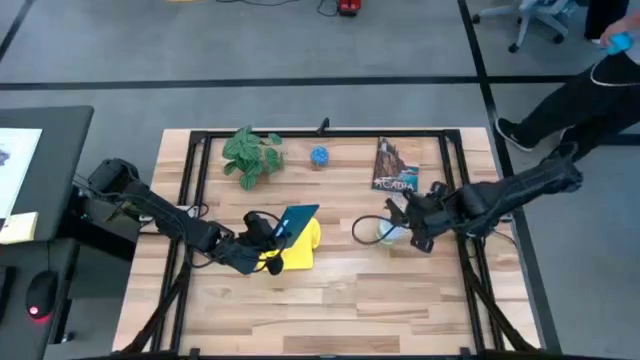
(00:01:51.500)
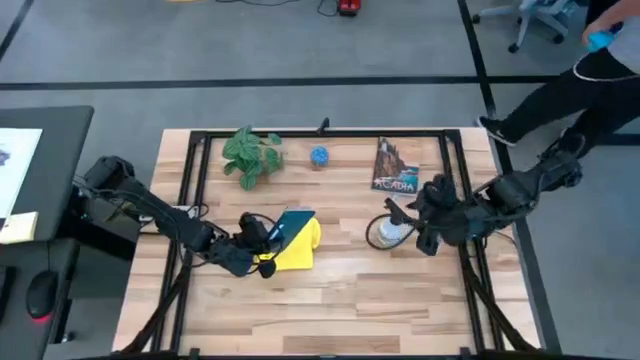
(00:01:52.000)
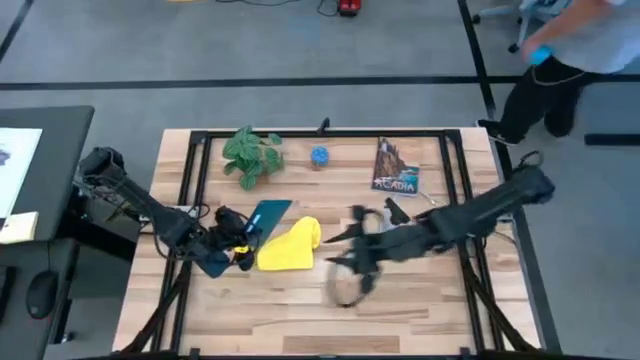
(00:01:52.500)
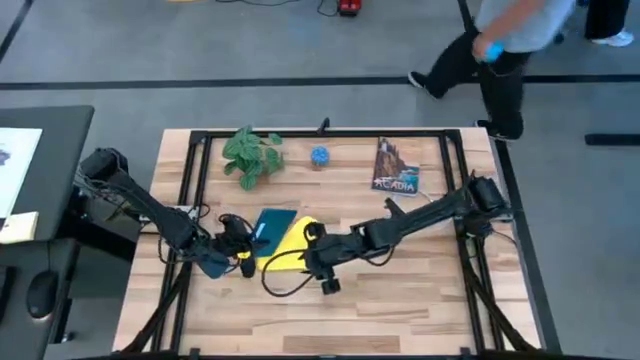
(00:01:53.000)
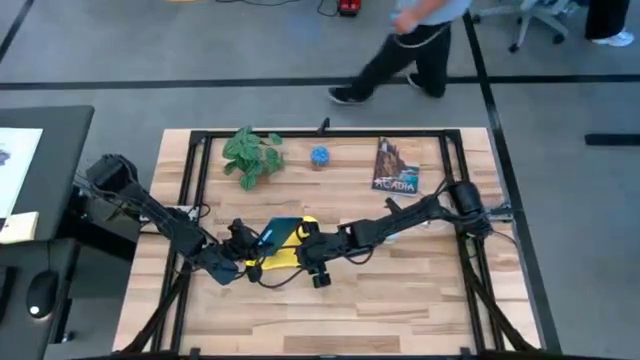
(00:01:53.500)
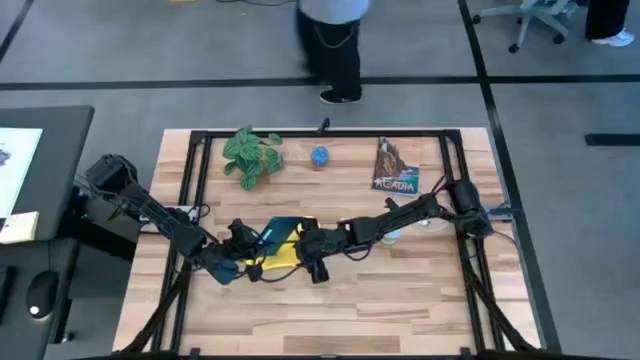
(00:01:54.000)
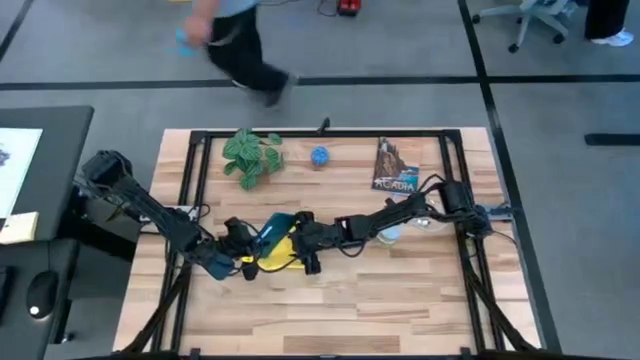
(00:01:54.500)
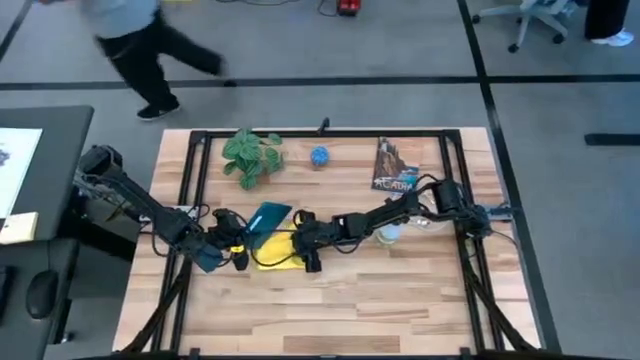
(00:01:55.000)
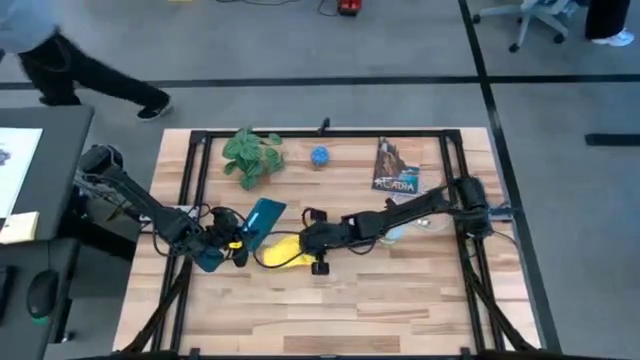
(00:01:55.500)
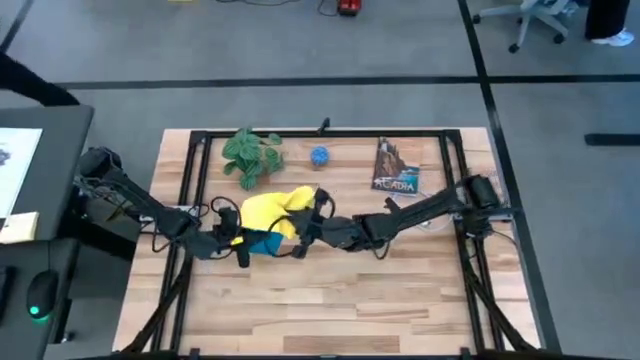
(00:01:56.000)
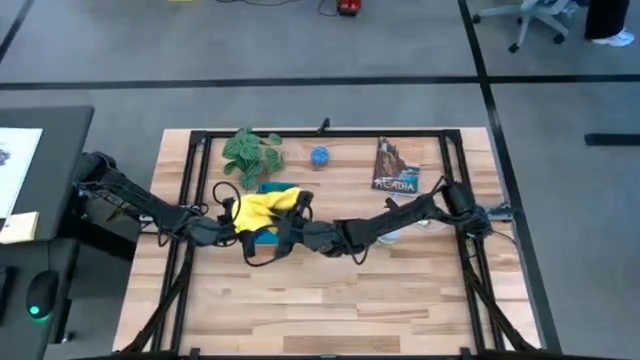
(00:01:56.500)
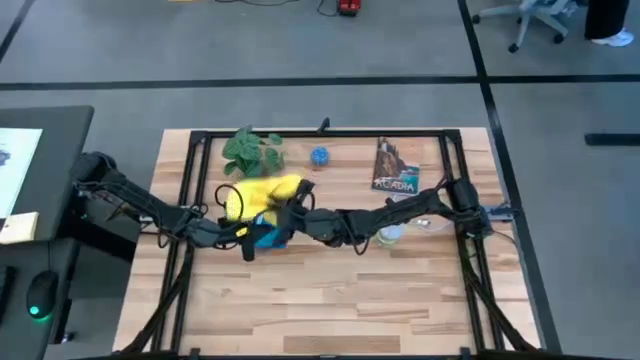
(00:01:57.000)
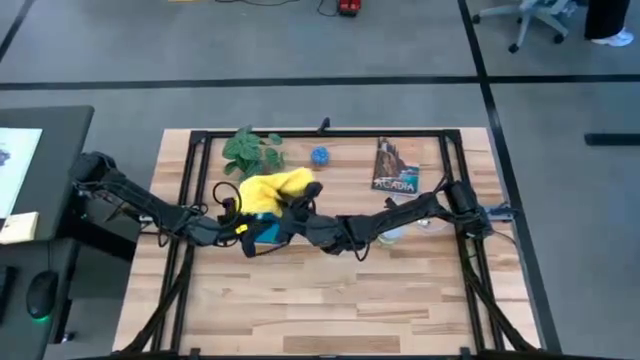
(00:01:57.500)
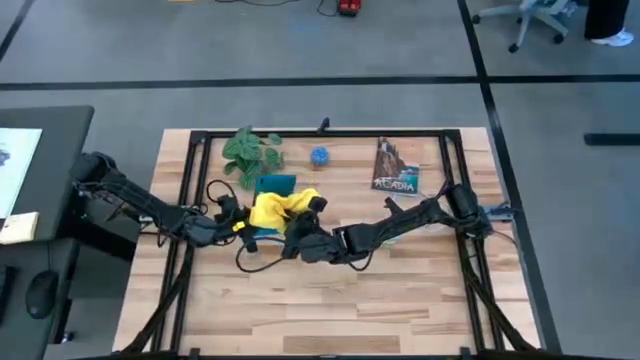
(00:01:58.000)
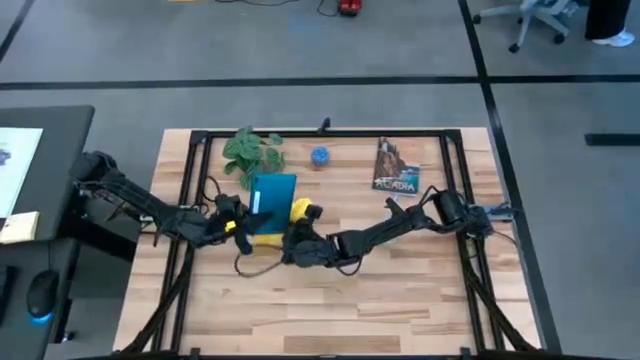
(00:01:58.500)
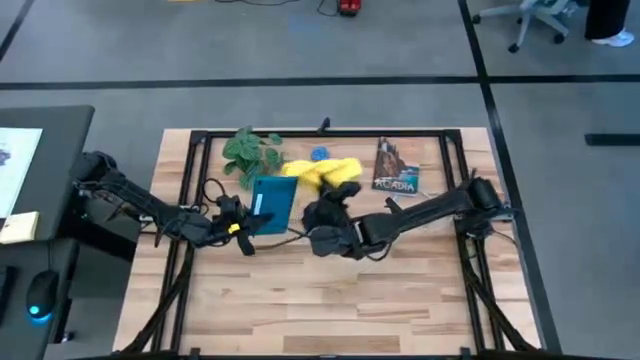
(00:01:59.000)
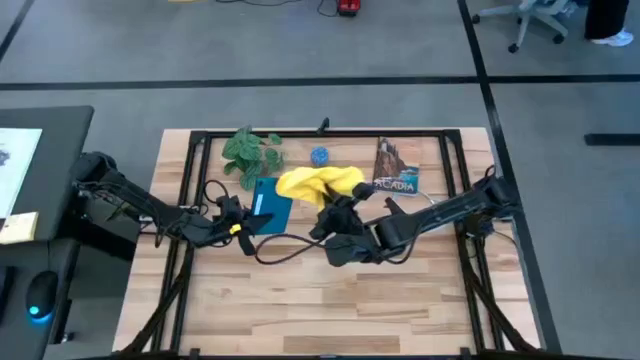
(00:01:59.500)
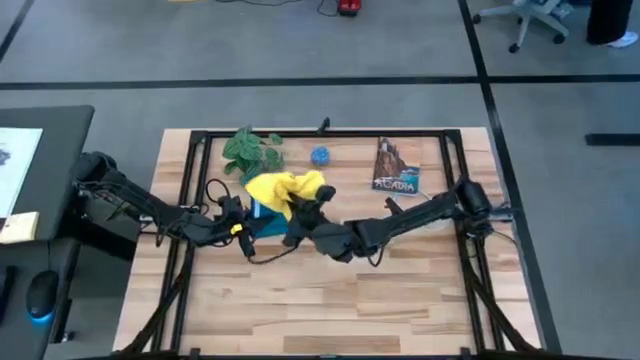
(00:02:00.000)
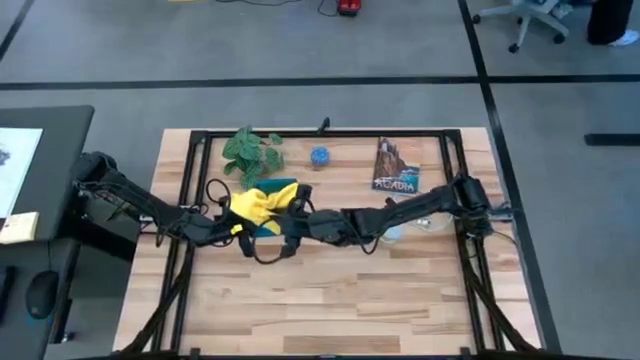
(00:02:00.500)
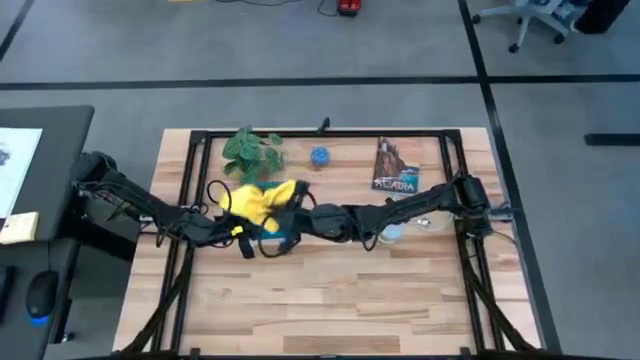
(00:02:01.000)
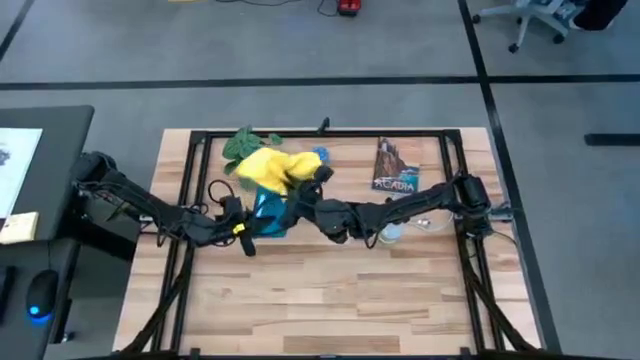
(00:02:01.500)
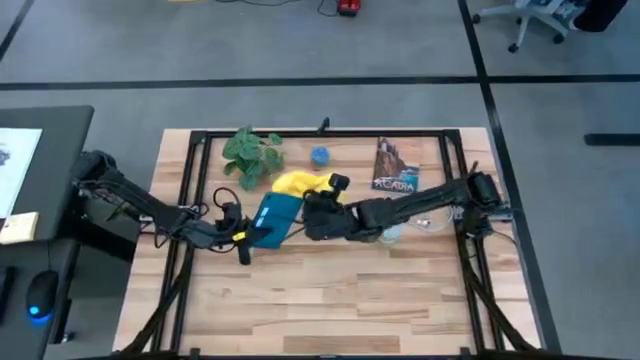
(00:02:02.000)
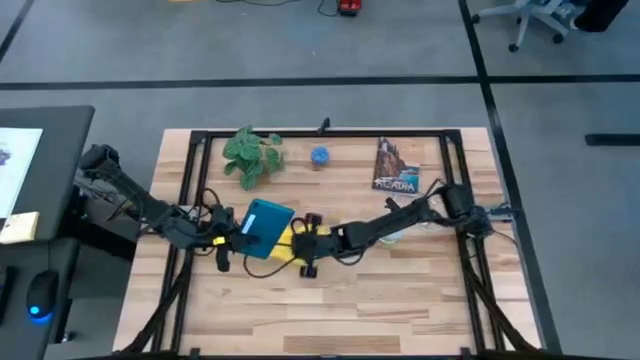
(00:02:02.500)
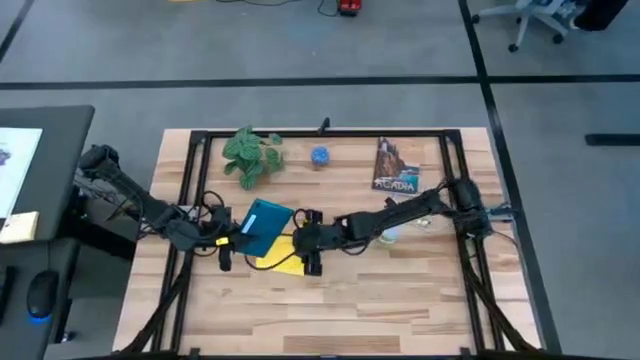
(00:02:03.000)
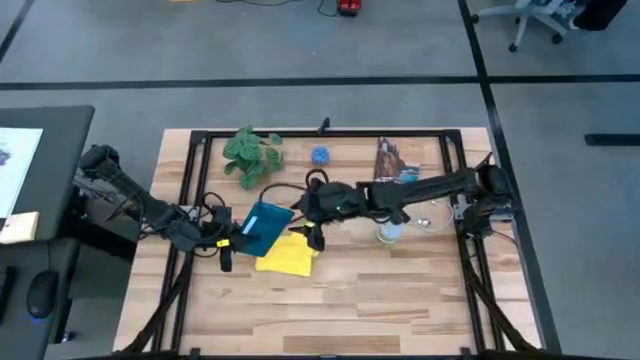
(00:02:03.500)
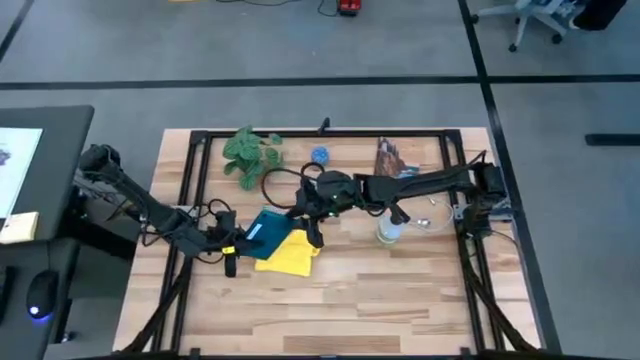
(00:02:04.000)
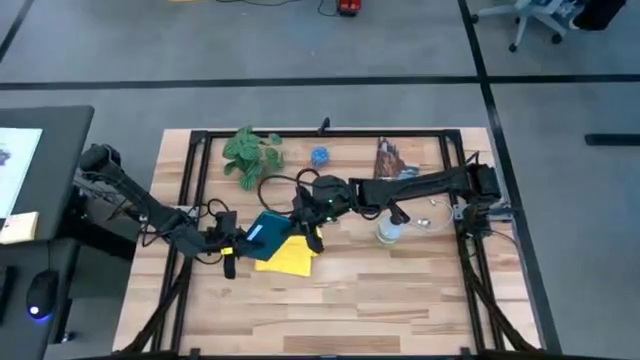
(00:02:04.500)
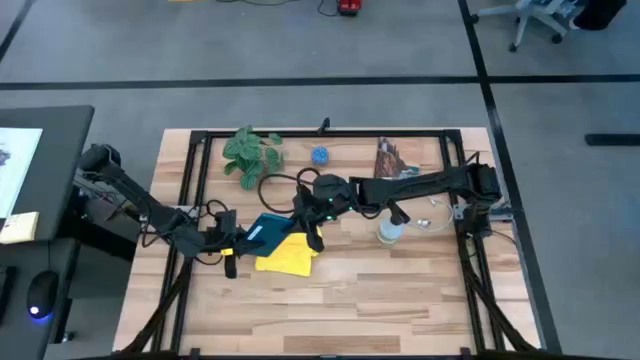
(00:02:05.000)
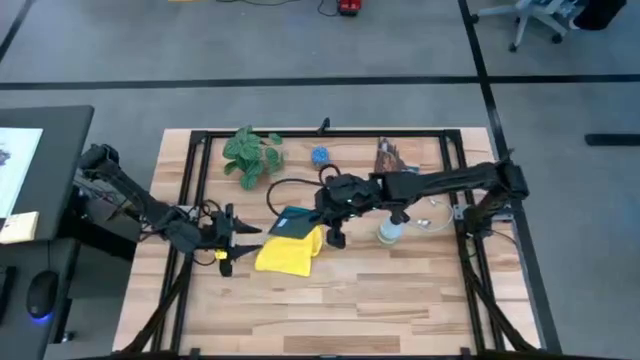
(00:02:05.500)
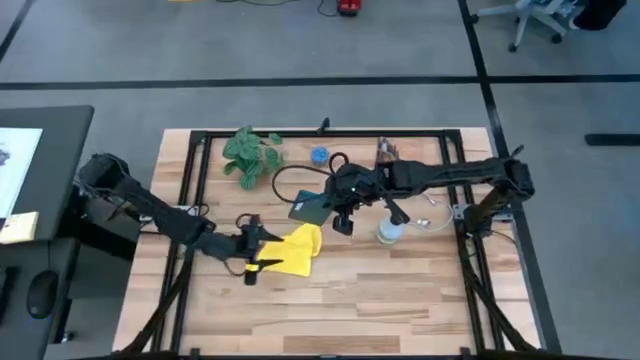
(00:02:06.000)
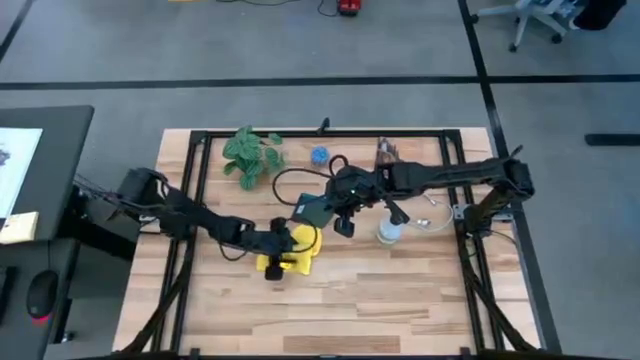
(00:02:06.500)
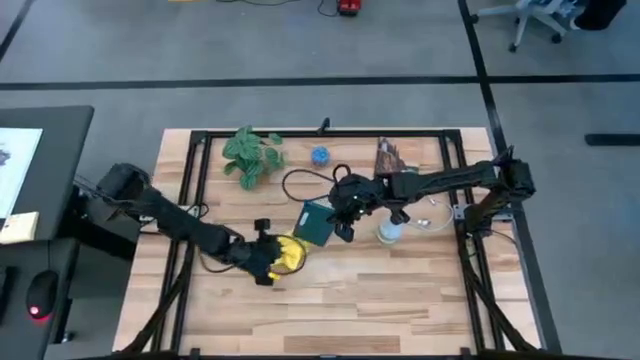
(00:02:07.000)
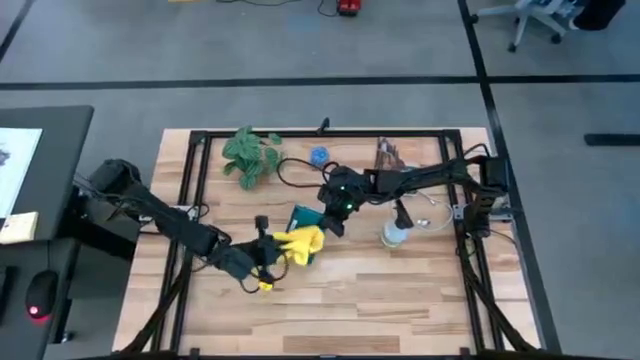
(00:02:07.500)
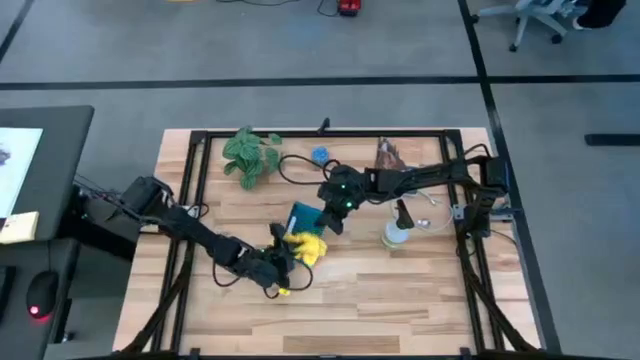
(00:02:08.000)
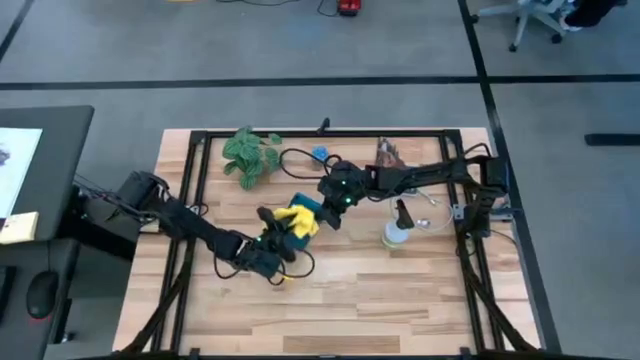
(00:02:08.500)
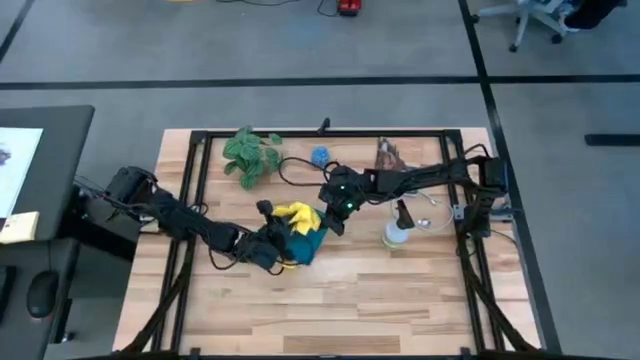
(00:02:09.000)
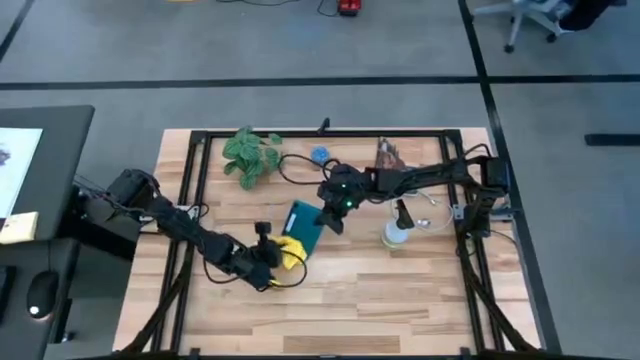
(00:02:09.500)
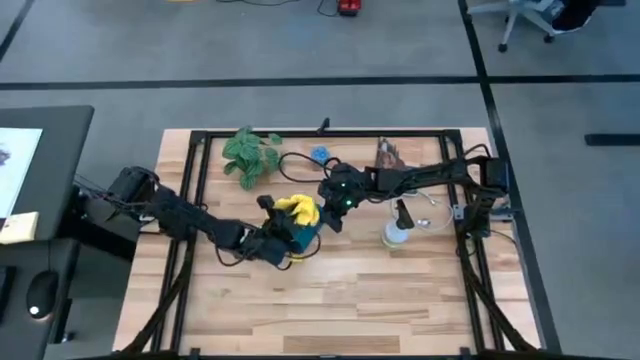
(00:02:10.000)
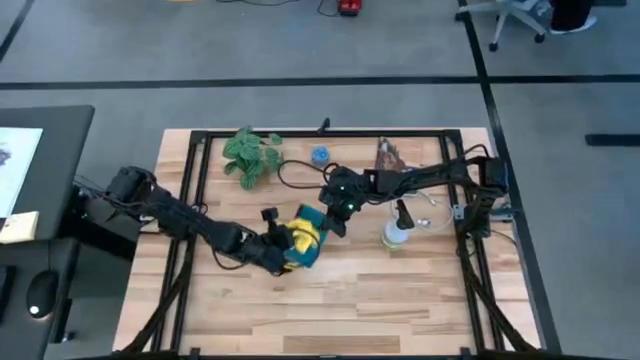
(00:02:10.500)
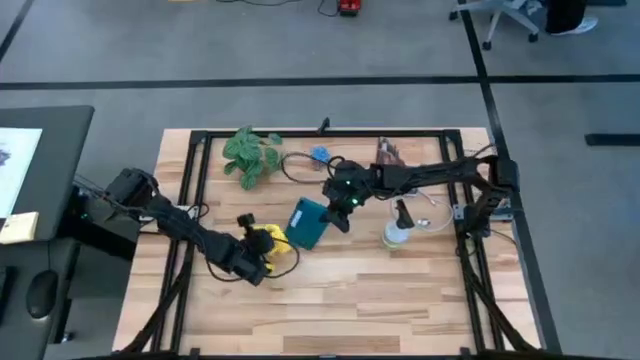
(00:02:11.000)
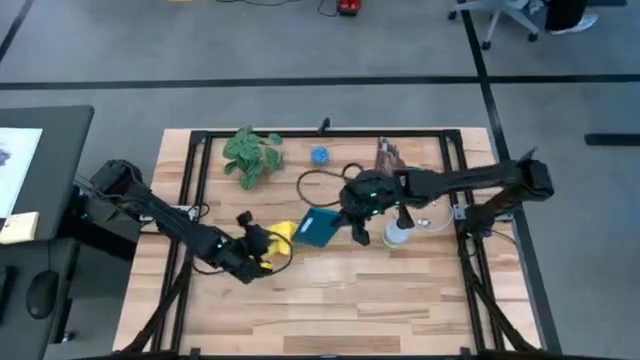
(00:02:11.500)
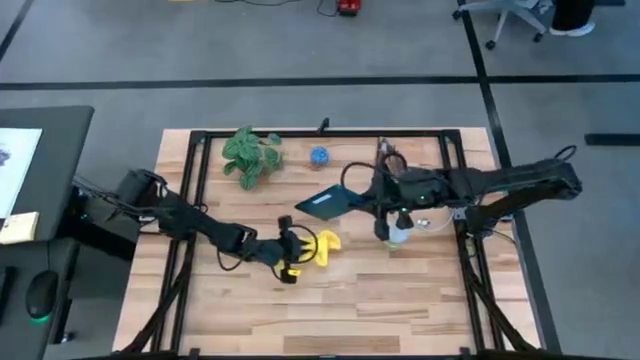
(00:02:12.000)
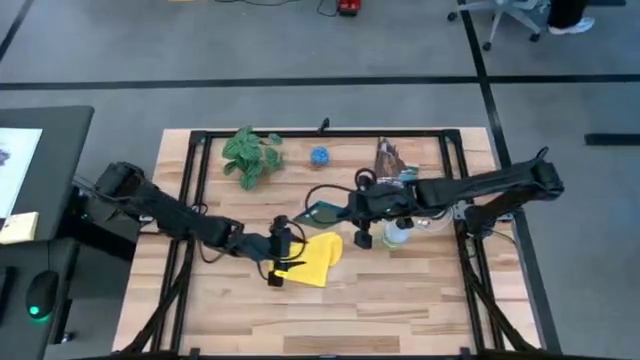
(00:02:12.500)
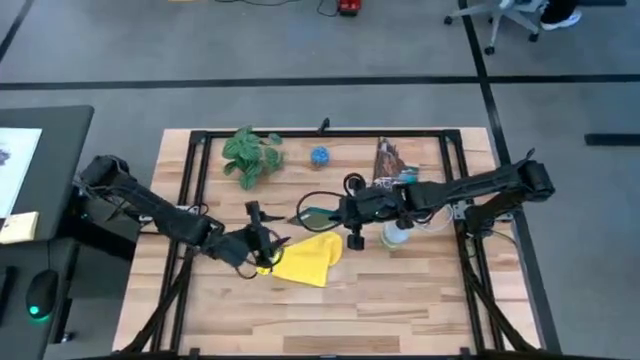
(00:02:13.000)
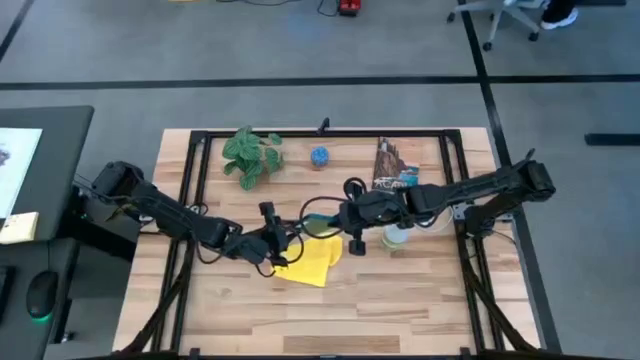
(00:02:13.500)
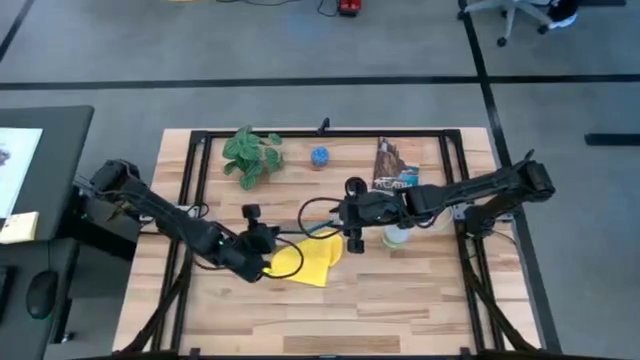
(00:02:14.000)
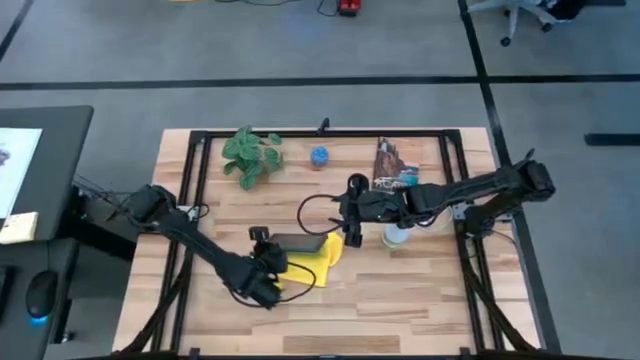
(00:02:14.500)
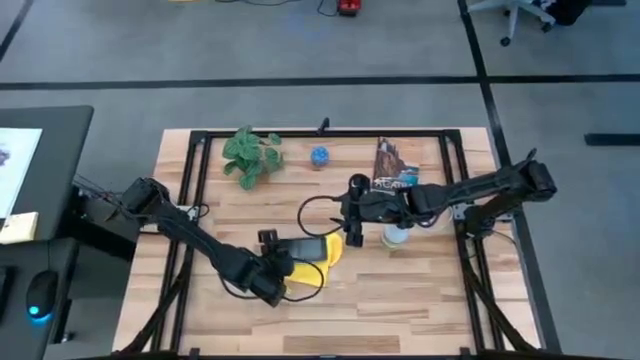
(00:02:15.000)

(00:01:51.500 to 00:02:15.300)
Task: Apply microfiber cloth
Wipe the blue tablet with the yellow microfiber cloth
